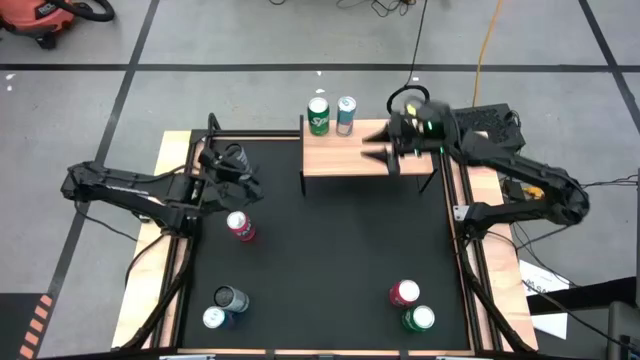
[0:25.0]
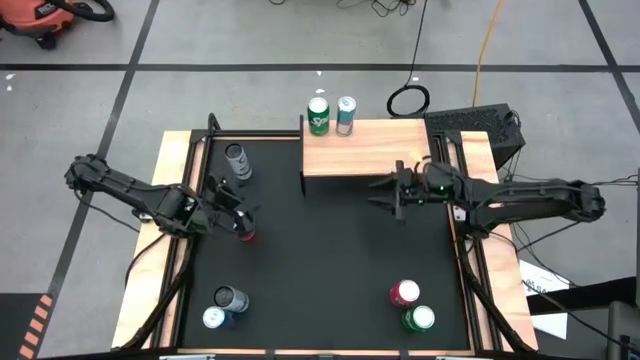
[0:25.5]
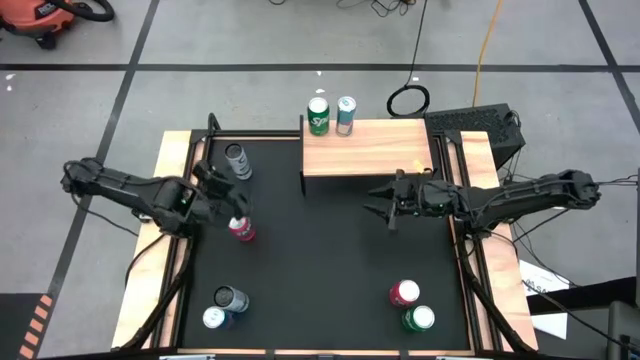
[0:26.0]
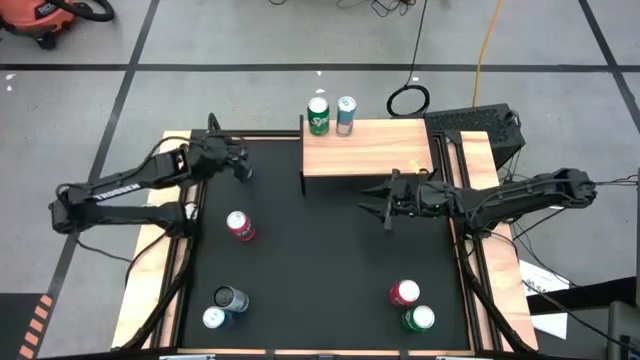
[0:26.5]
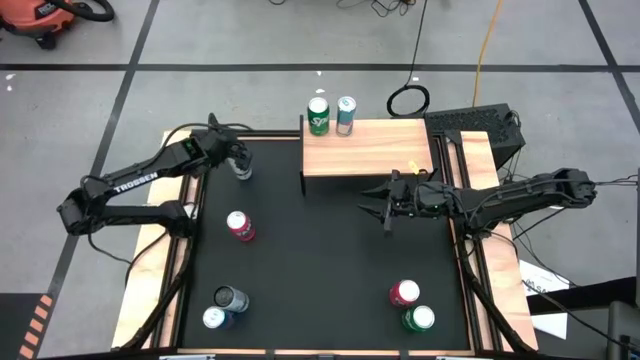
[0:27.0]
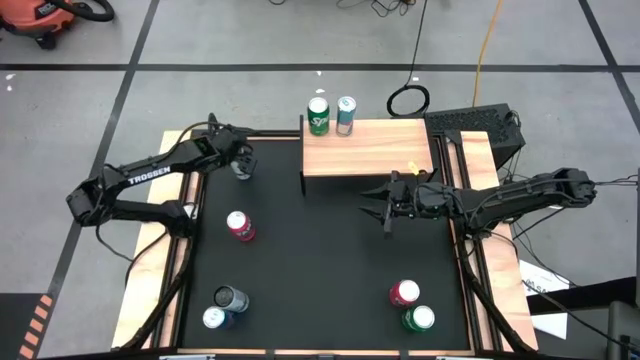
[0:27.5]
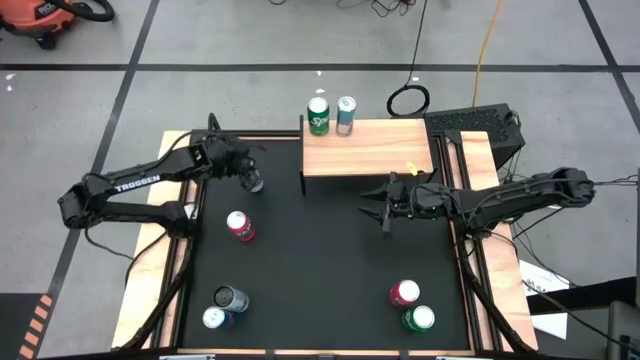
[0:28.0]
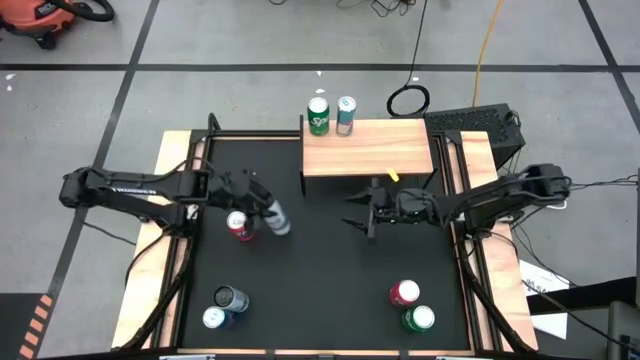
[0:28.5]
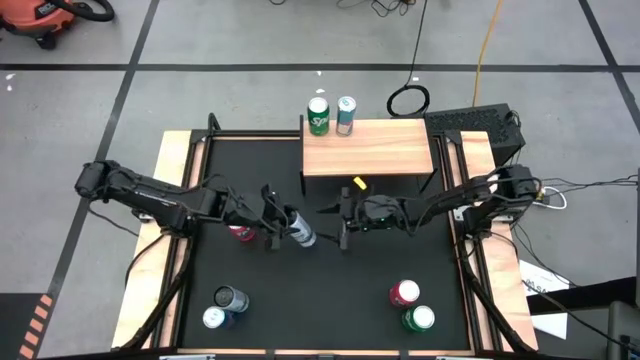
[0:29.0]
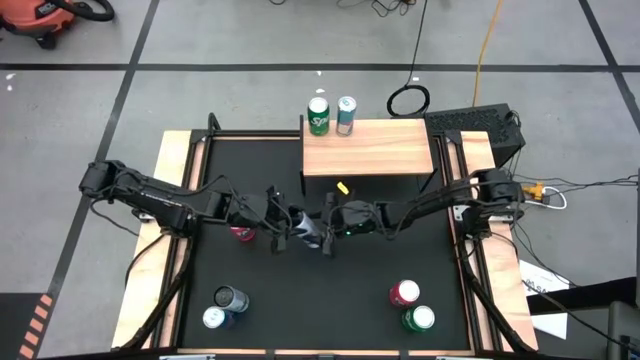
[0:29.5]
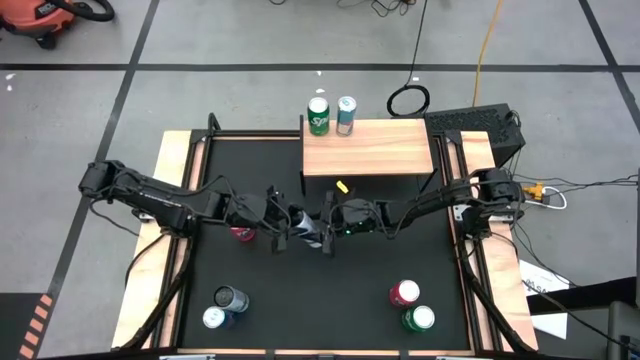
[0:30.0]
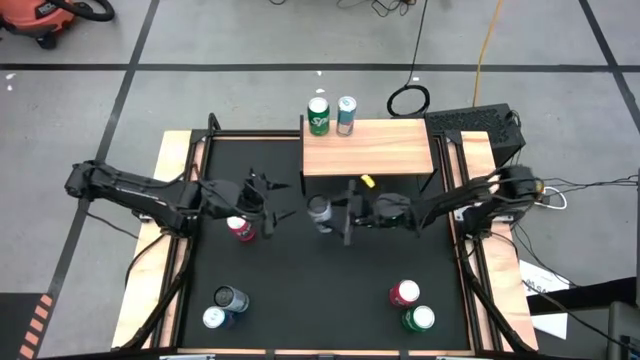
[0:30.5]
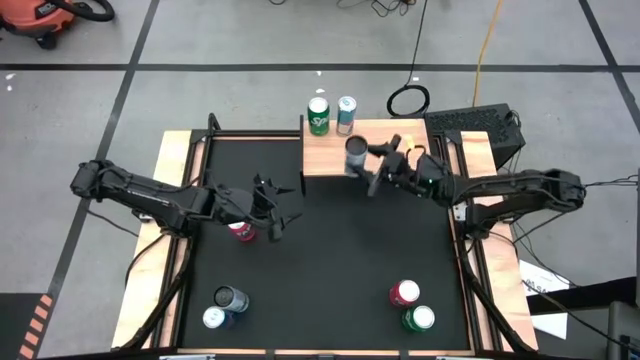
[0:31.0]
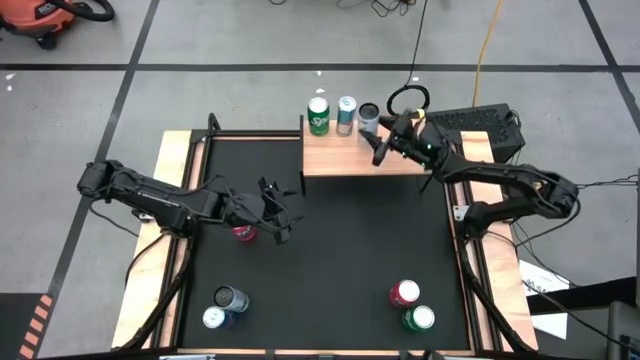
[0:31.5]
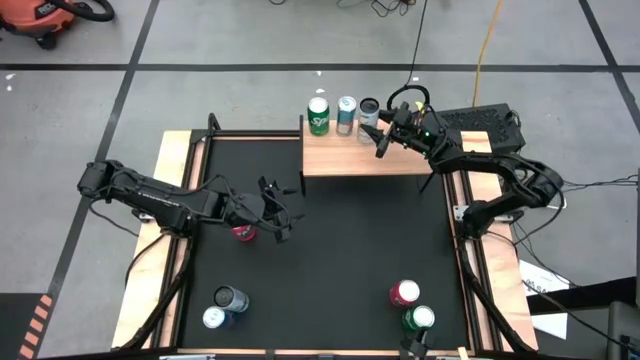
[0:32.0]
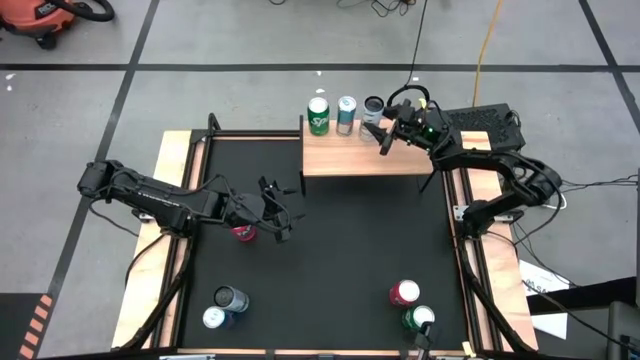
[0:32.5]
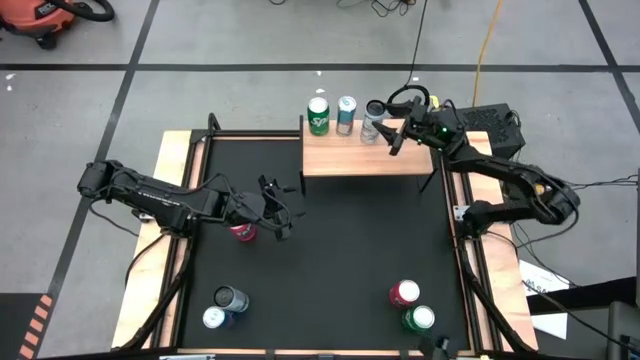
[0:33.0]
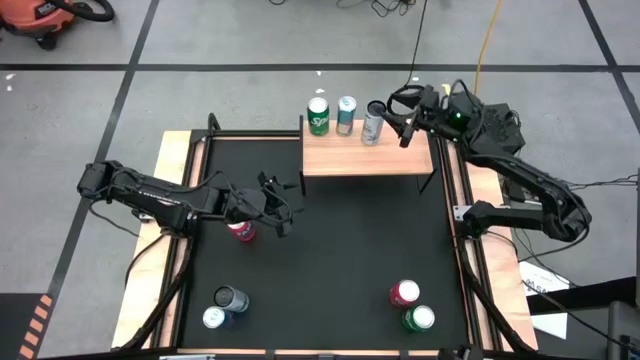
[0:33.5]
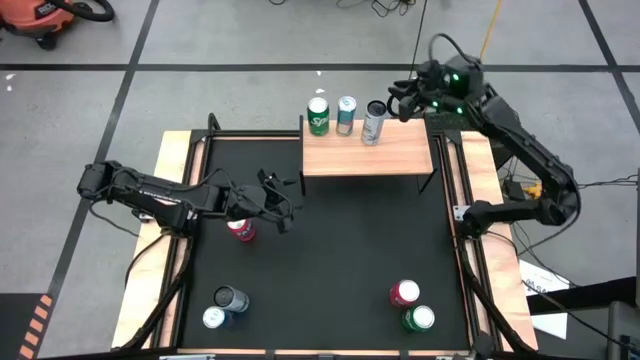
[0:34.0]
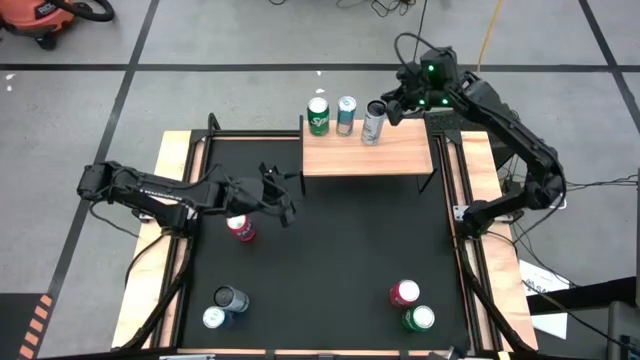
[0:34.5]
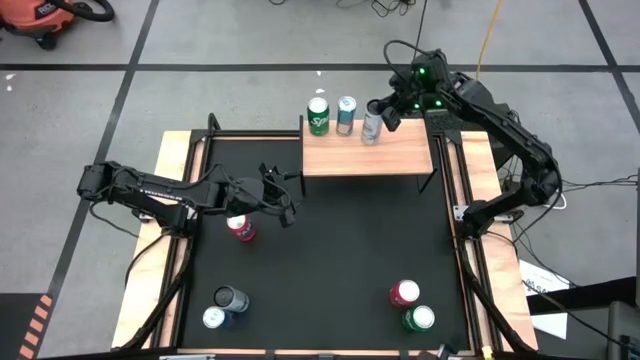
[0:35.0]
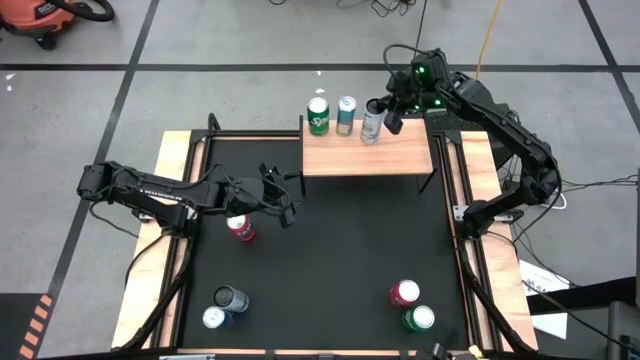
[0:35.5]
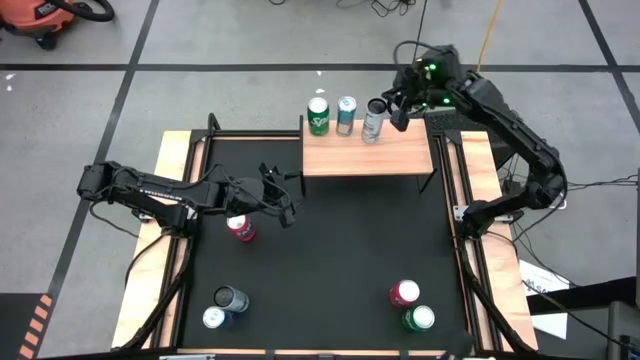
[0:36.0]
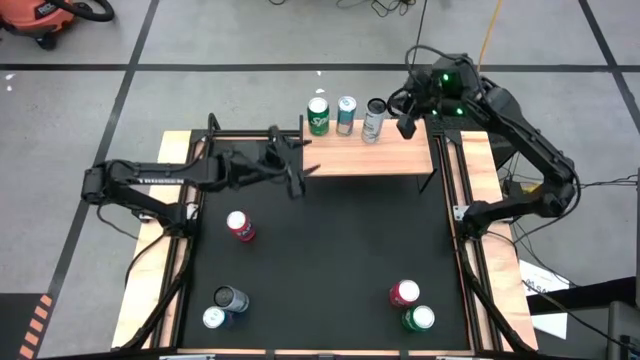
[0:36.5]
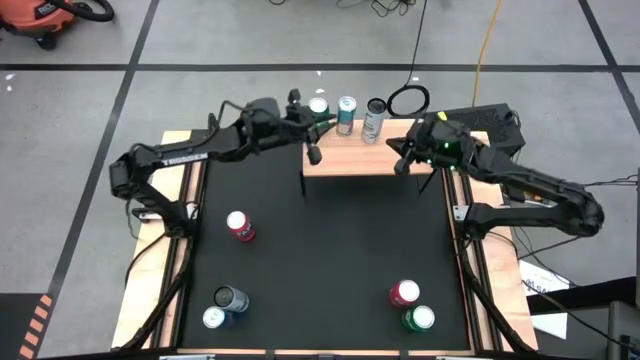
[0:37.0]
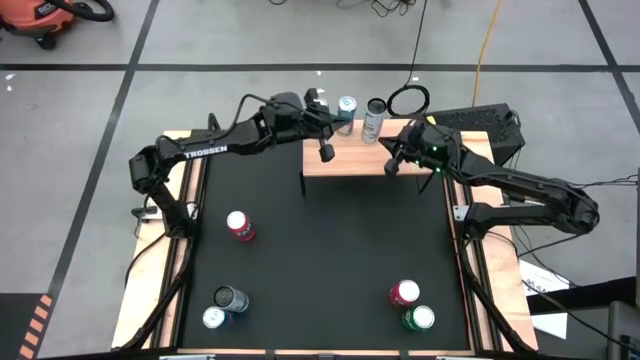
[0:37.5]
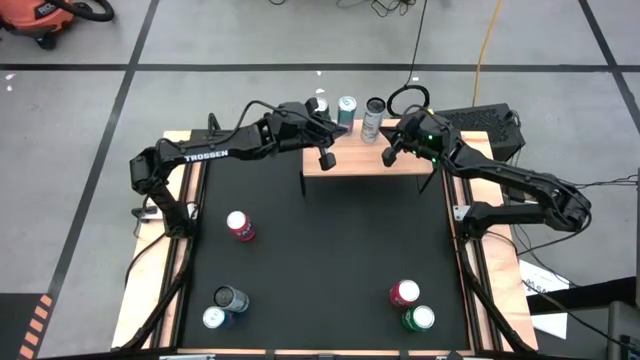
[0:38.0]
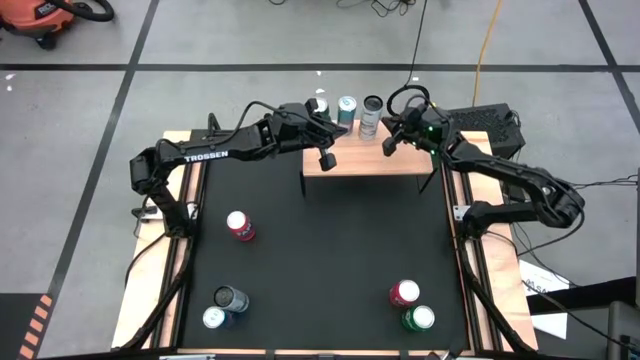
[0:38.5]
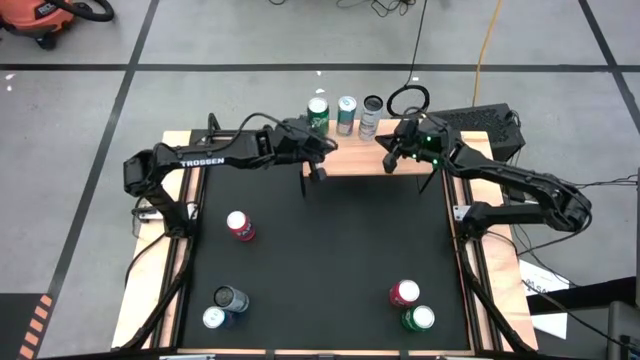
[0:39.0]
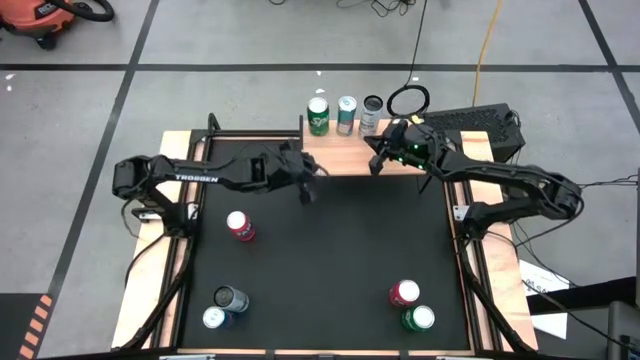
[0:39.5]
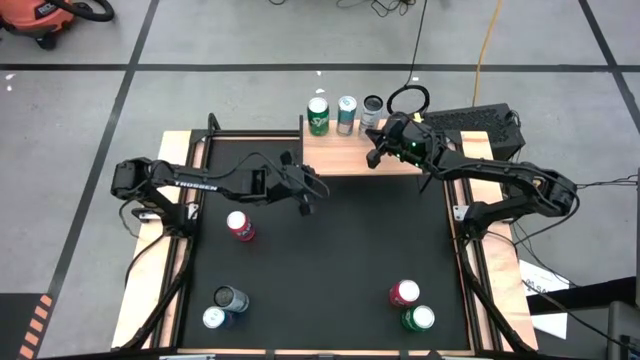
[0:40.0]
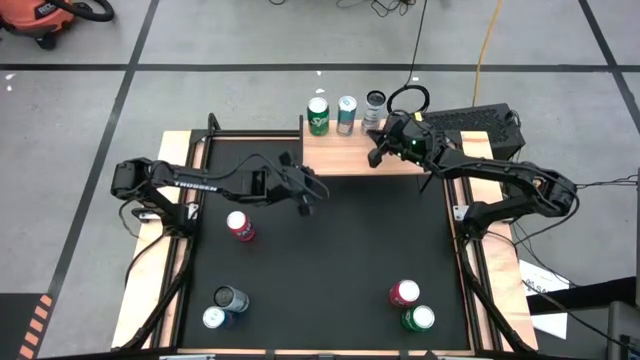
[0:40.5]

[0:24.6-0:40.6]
Task: Place canned beverage on shelf
Put the top white-blue on the shelf

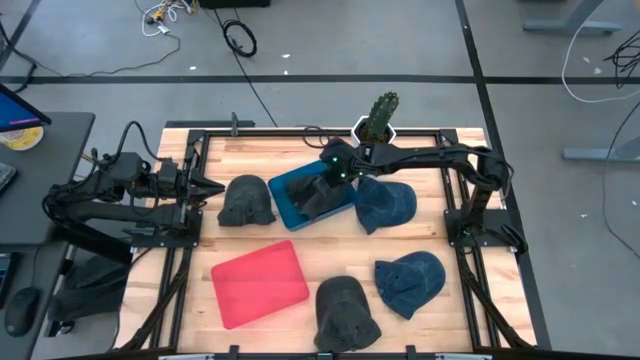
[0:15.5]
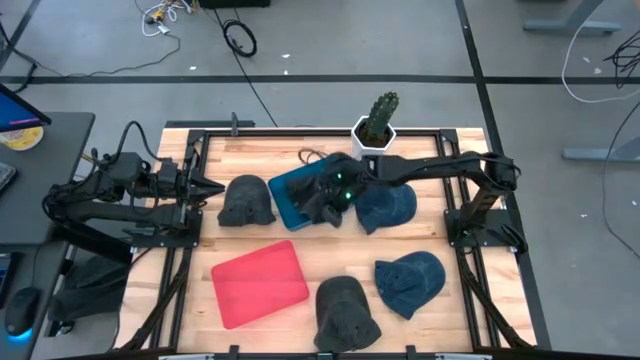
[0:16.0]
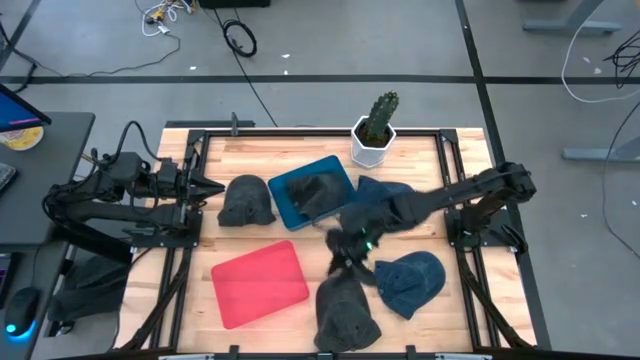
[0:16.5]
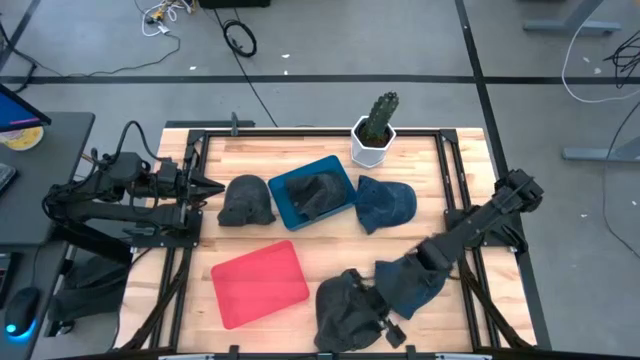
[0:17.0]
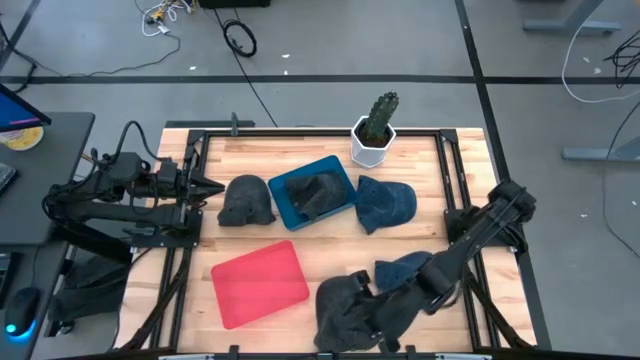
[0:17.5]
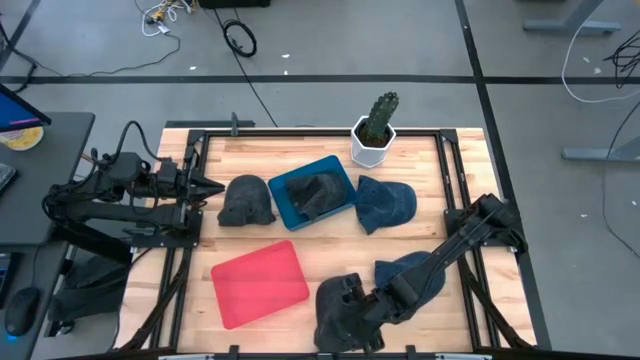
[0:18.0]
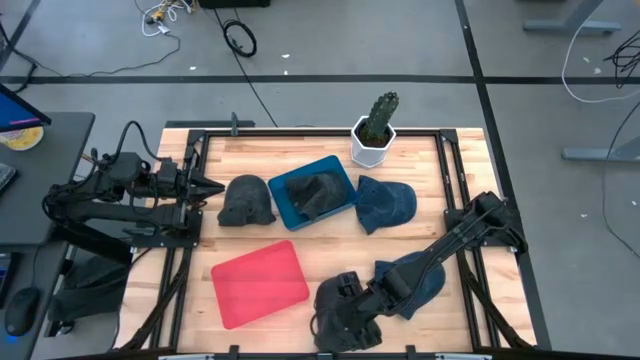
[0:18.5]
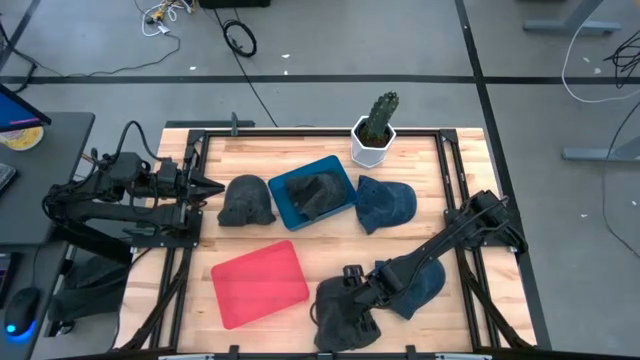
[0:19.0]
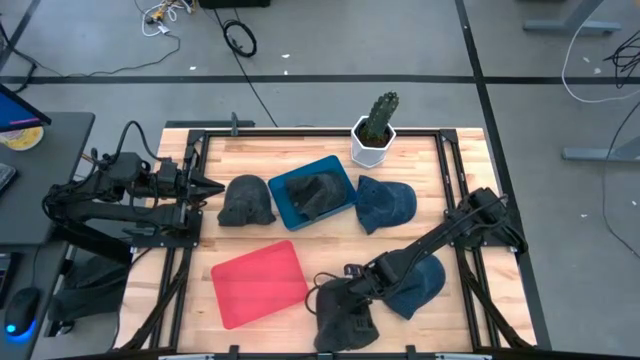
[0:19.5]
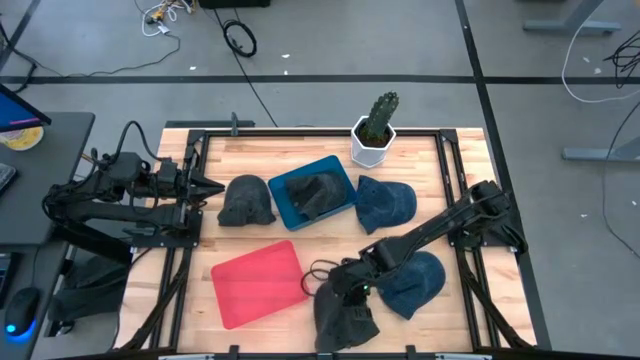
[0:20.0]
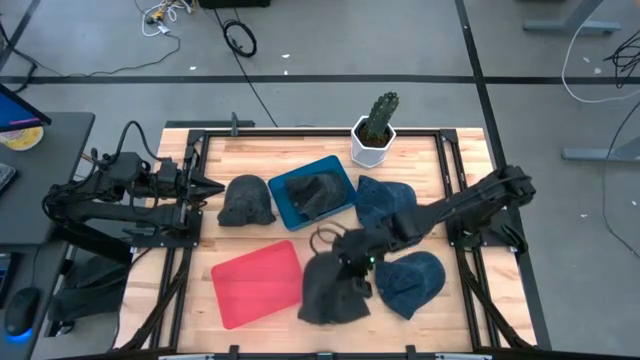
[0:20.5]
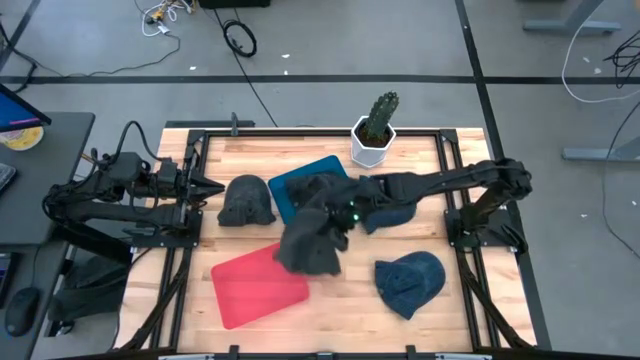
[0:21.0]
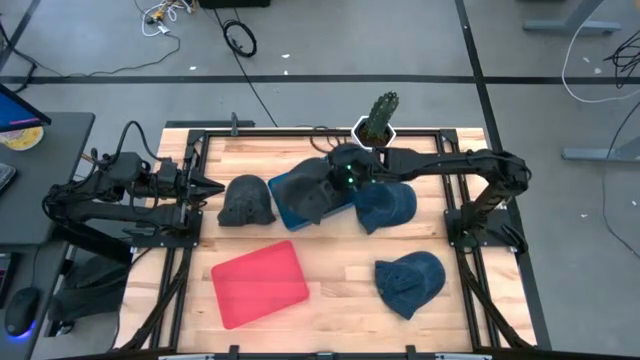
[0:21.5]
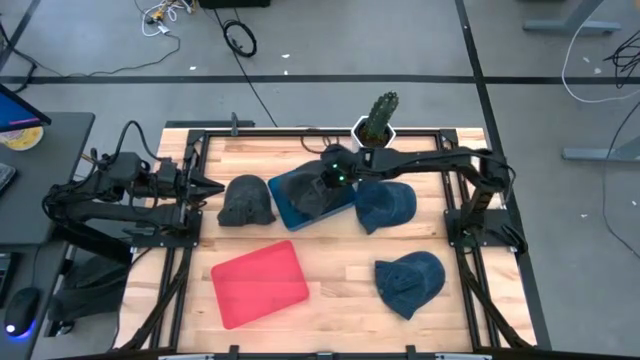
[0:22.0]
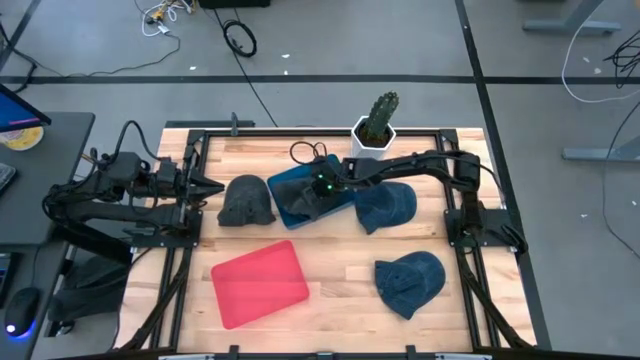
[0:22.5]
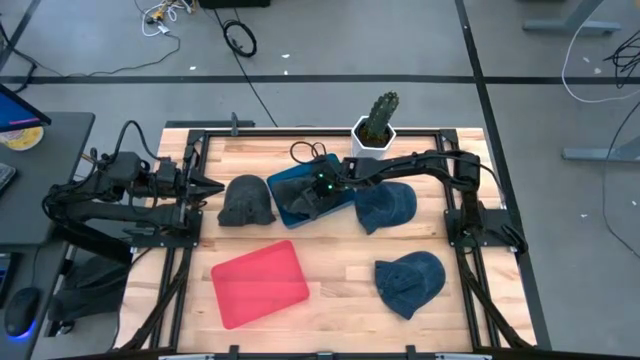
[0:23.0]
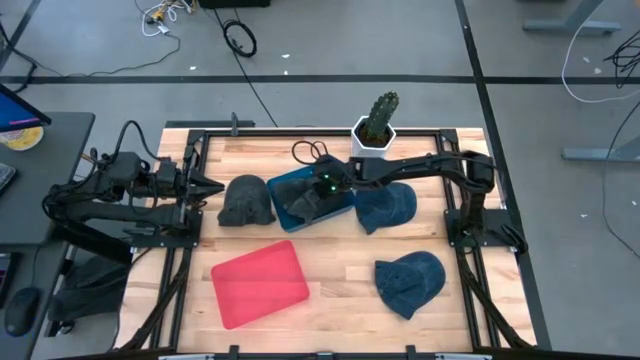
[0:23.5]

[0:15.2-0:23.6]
Task: Pick & Place hat
Put the bottom gray cap into the blue bin
